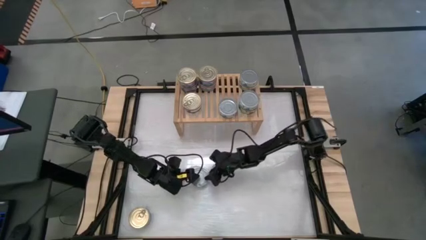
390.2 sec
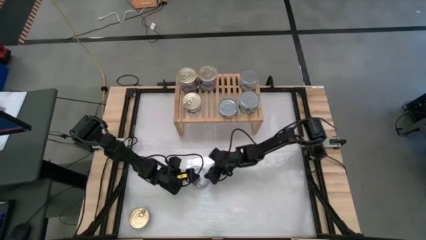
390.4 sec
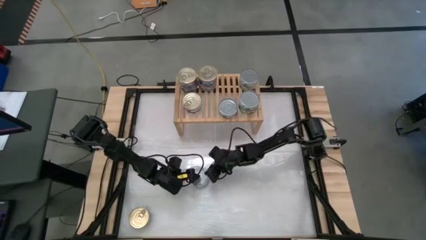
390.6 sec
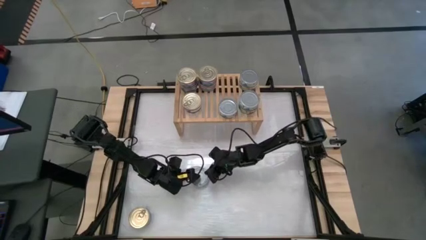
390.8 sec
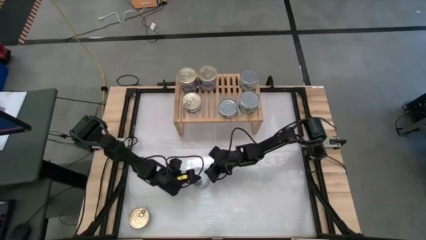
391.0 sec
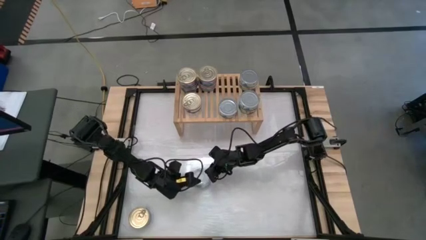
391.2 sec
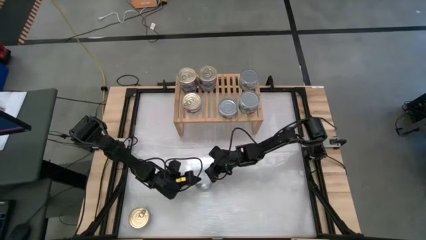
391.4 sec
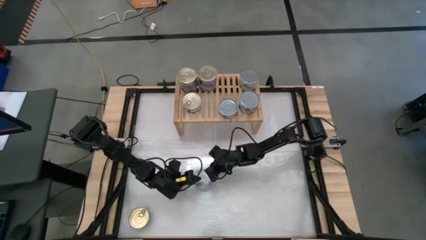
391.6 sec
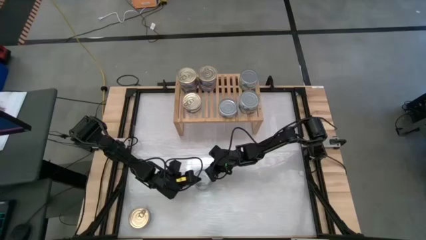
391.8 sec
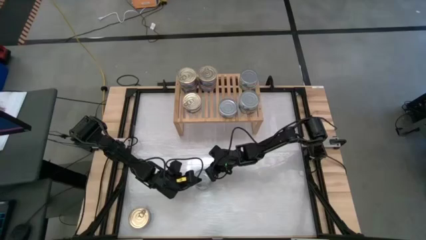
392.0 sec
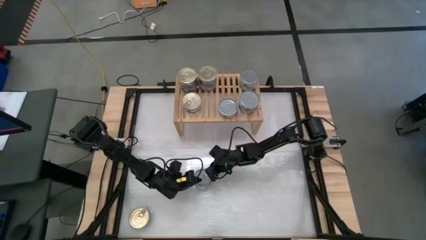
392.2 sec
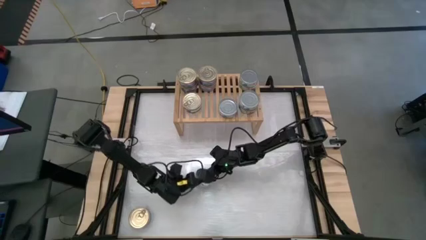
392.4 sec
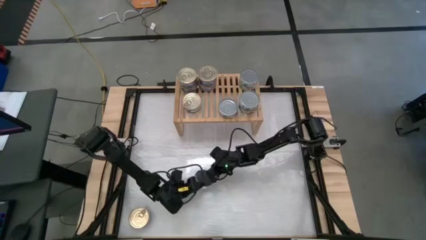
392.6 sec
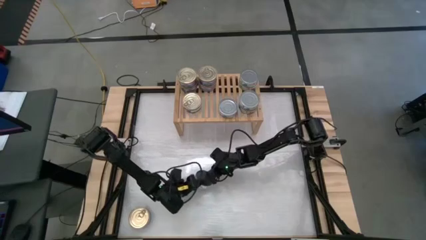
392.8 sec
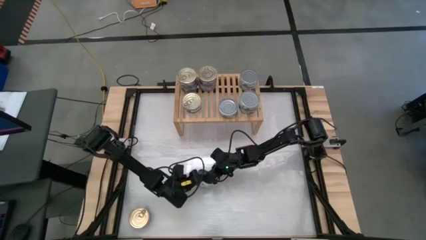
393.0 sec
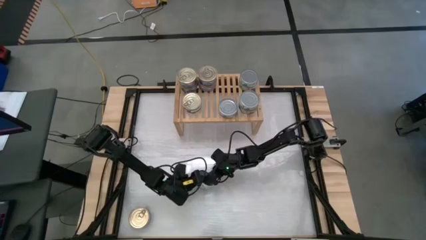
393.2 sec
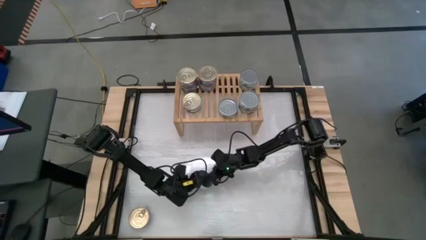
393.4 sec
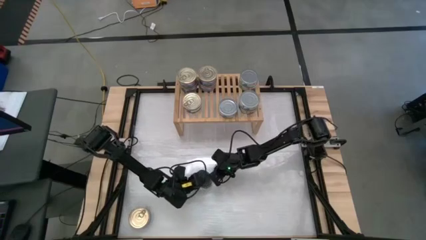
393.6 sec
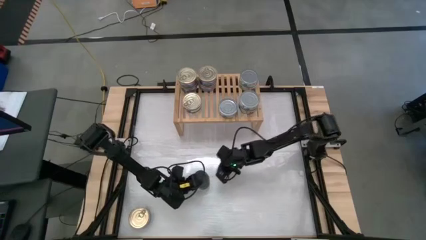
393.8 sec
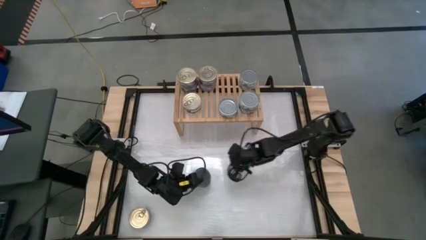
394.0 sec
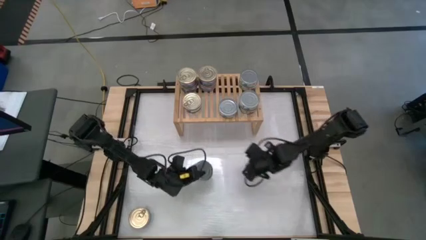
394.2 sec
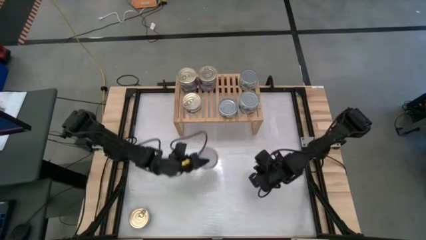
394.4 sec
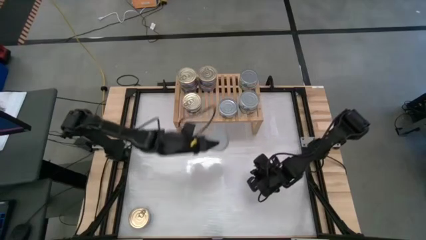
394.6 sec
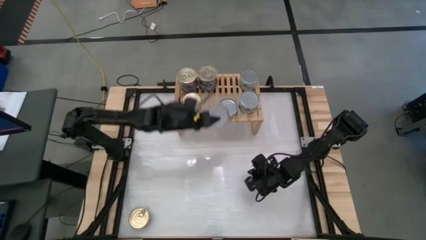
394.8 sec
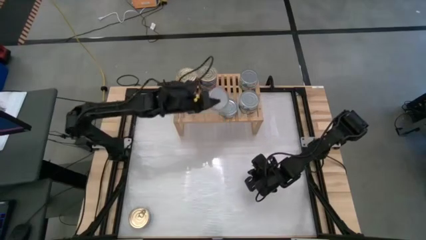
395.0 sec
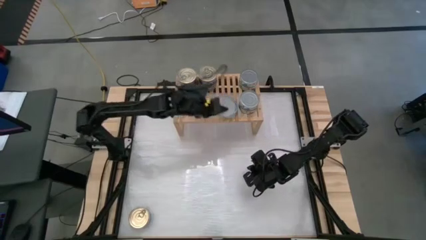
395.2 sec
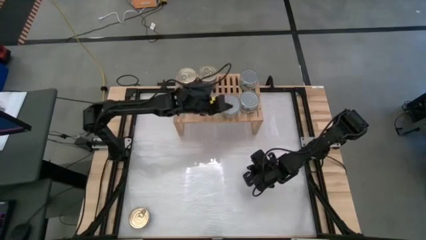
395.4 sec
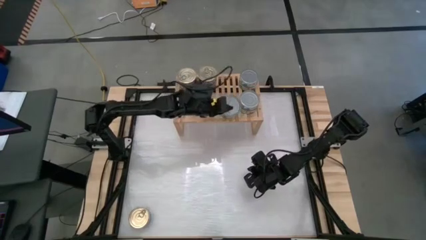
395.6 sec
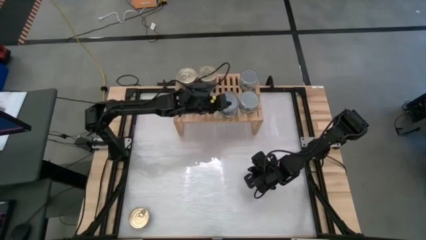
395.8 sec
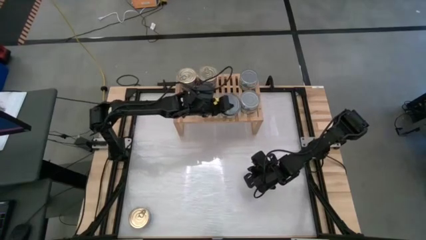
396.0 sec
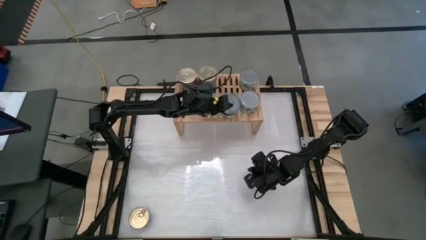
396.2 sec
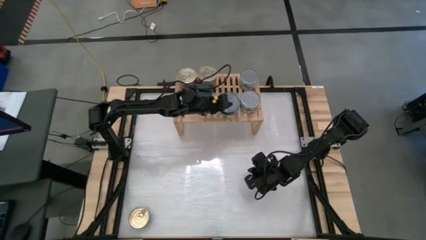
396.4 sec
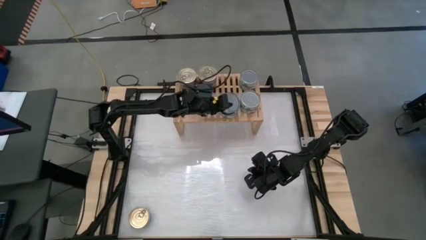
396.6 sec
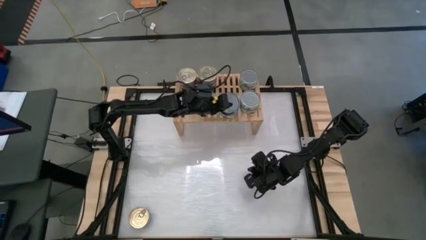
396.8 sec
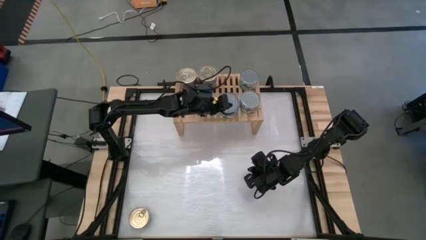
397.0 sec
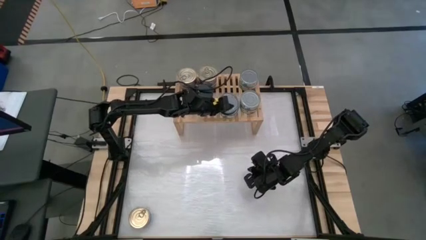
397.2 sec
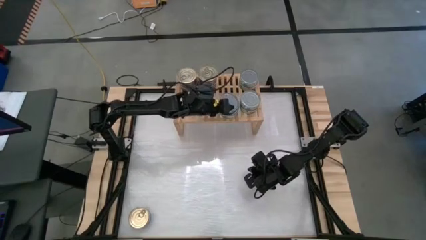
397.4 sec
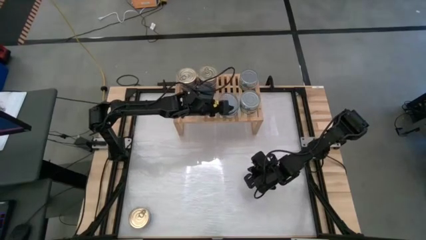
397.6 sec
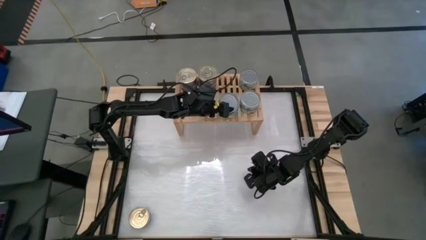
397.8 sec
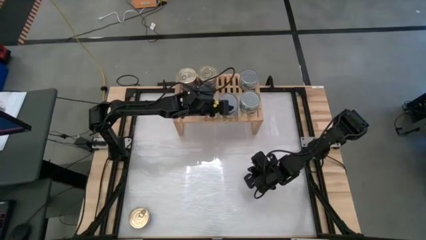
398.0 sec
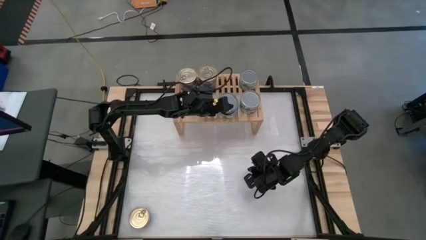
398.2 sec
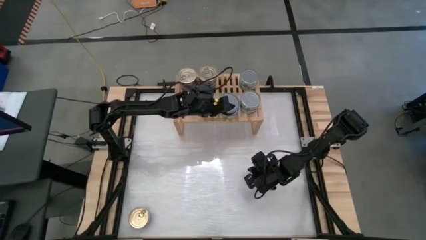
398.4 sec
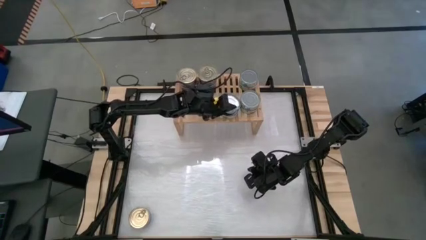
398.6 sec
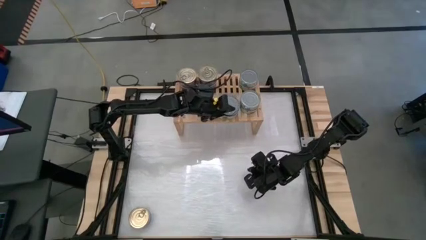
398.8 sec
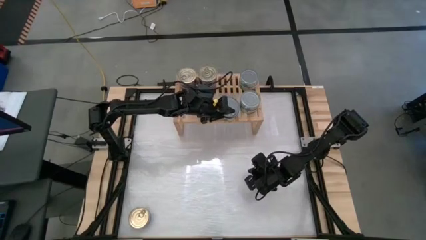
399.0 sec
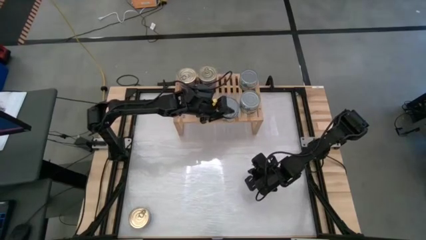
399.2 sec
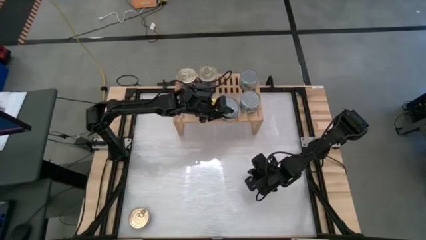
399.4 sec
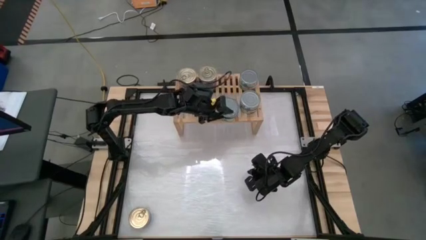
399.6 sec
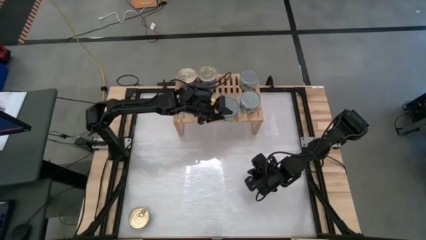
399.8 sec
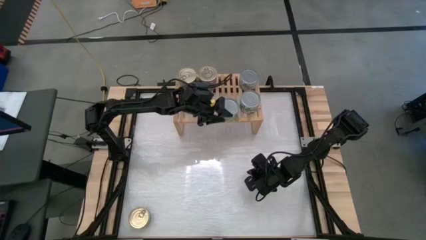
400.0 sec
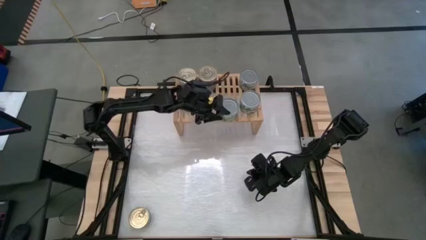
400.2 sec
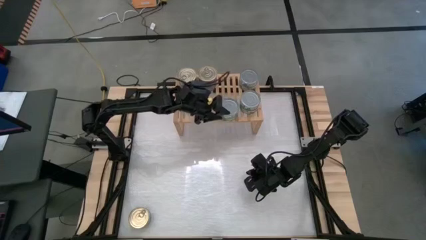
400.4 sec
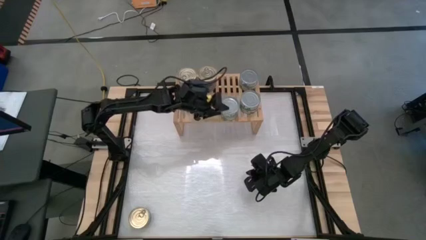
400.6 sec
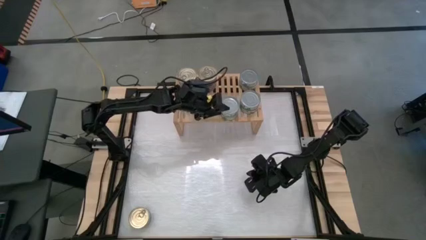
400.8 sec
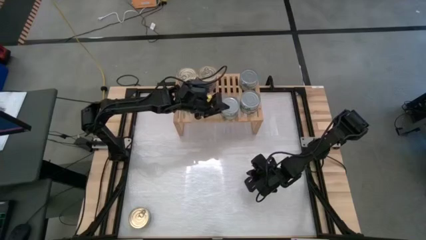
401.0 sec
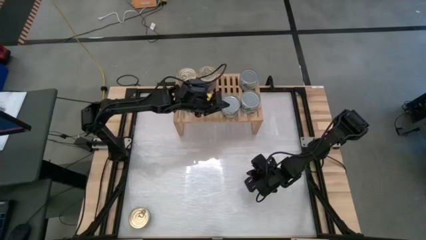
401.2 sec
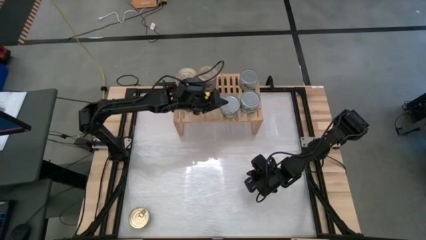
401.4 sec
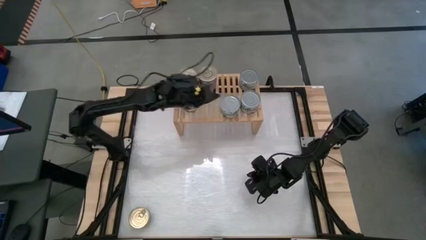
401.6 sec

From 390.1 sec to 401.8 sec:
Task: Stack canned seafood by type on shelf
Stack the green tuna can on top of the other green tuna can on the shelf
